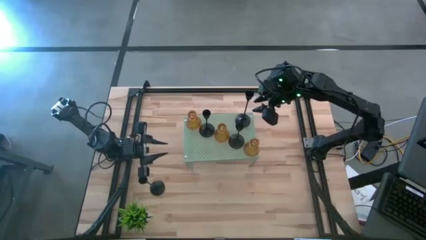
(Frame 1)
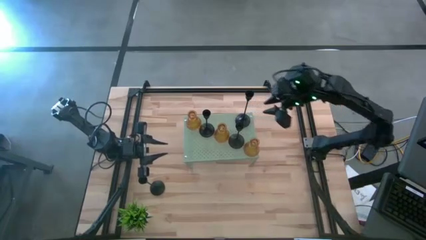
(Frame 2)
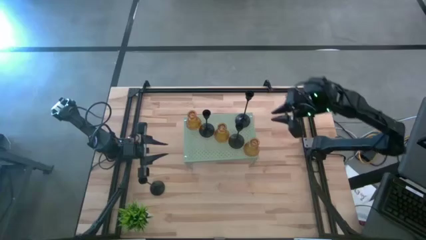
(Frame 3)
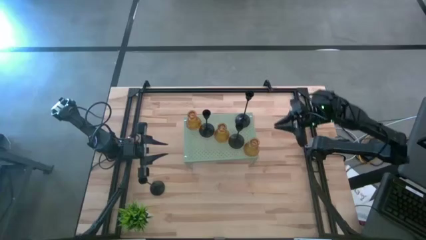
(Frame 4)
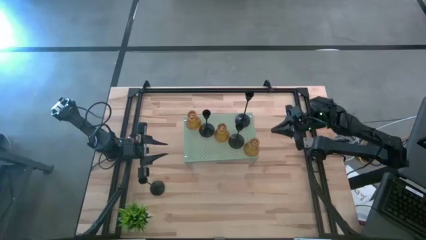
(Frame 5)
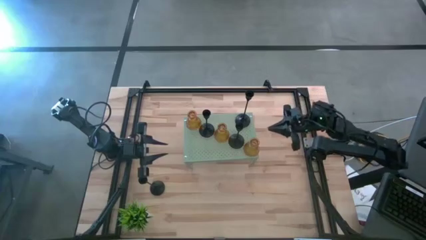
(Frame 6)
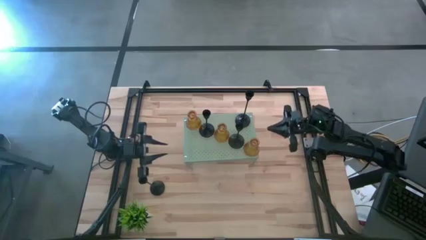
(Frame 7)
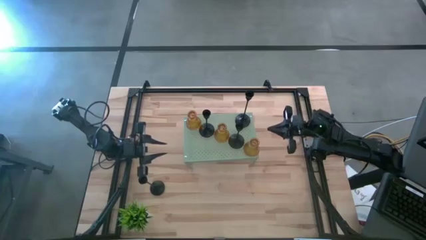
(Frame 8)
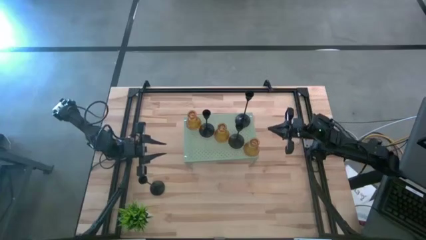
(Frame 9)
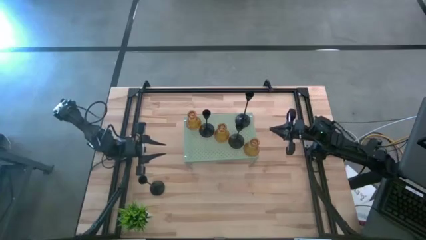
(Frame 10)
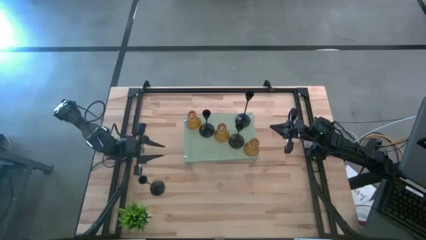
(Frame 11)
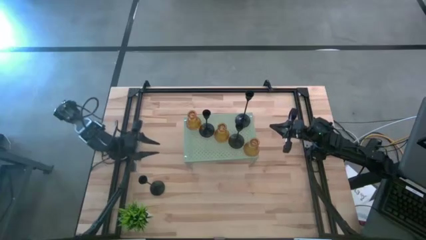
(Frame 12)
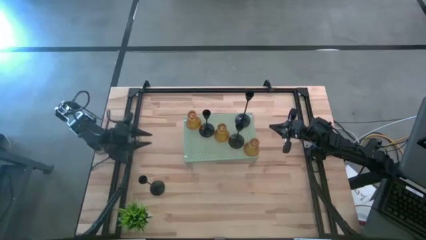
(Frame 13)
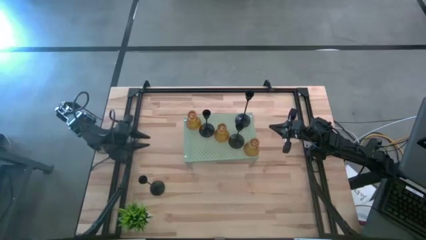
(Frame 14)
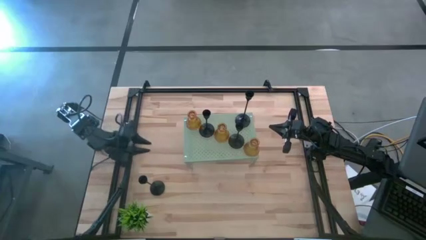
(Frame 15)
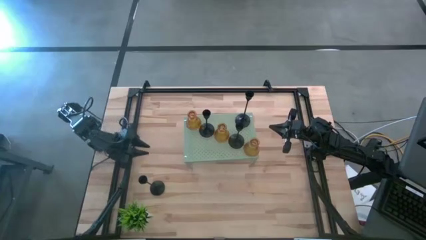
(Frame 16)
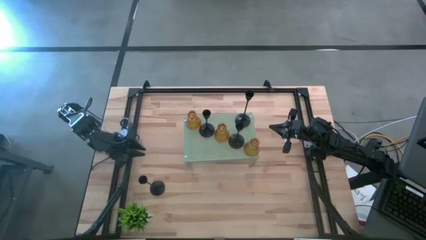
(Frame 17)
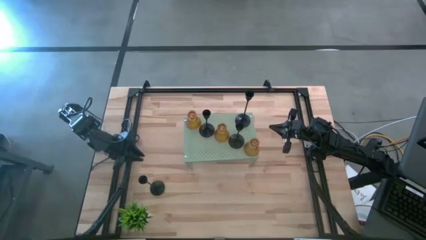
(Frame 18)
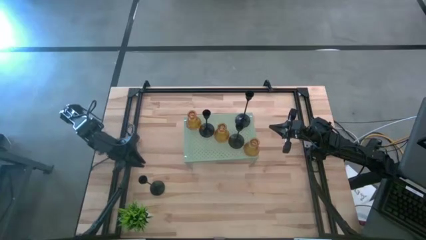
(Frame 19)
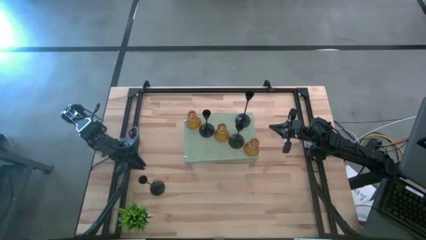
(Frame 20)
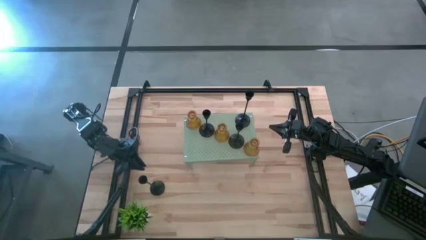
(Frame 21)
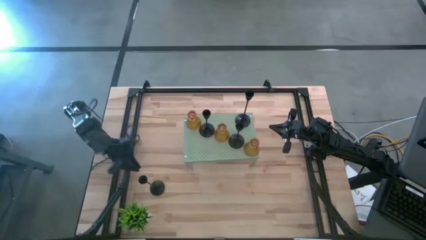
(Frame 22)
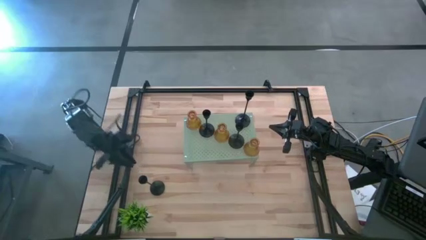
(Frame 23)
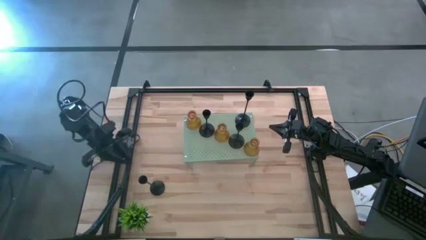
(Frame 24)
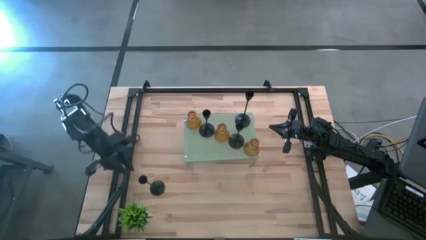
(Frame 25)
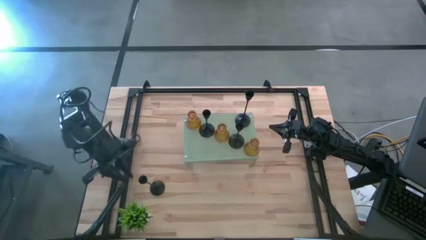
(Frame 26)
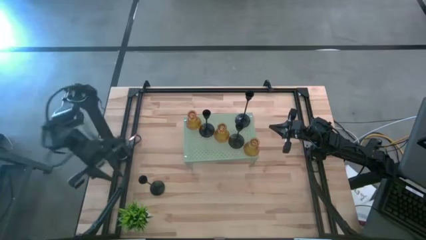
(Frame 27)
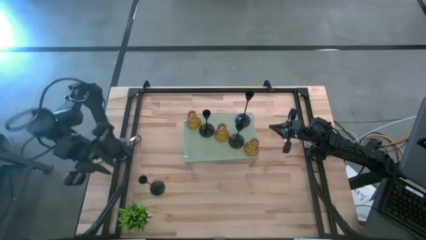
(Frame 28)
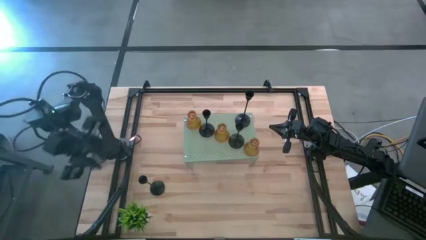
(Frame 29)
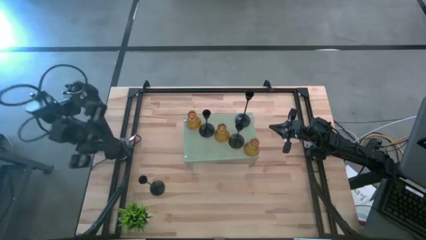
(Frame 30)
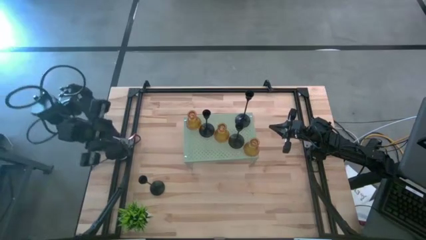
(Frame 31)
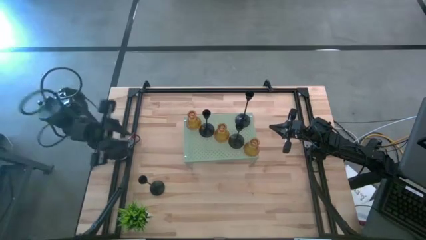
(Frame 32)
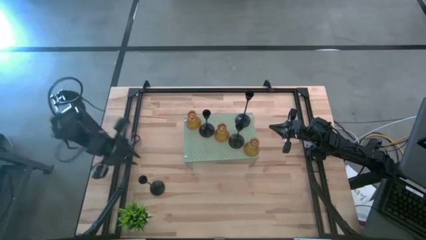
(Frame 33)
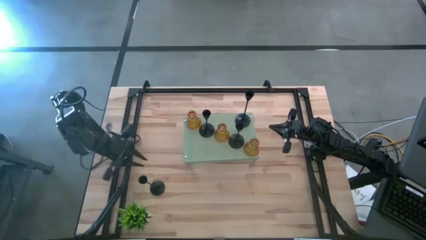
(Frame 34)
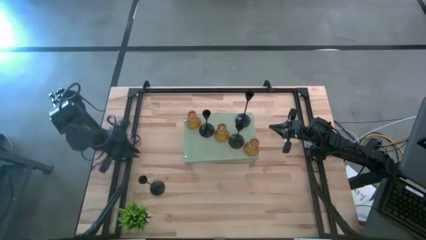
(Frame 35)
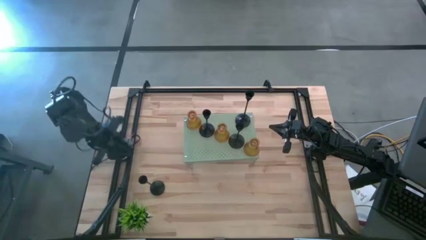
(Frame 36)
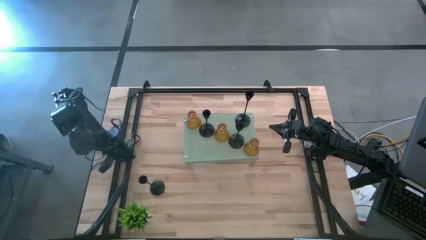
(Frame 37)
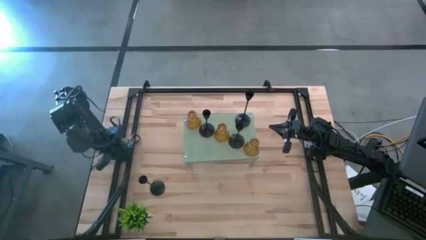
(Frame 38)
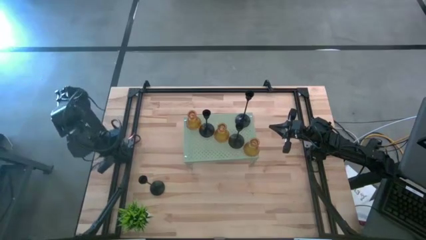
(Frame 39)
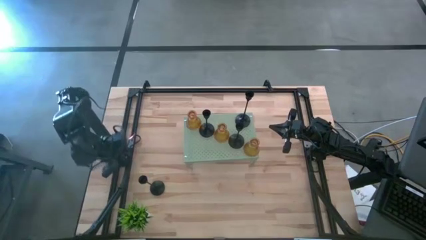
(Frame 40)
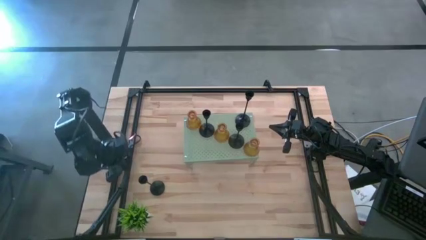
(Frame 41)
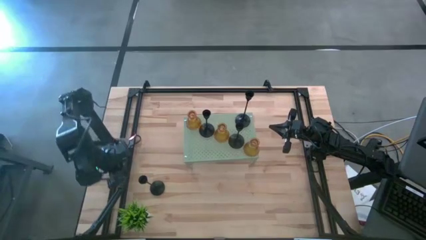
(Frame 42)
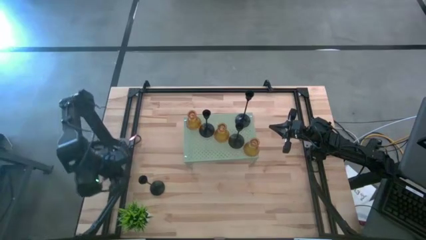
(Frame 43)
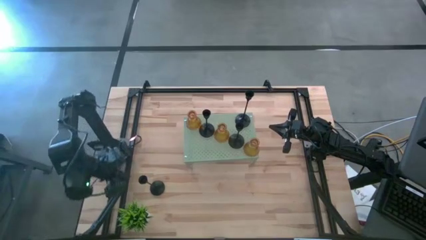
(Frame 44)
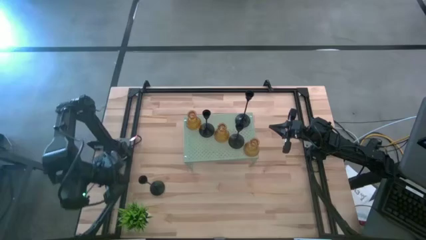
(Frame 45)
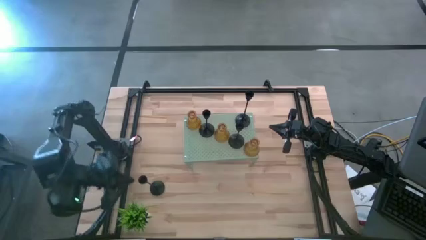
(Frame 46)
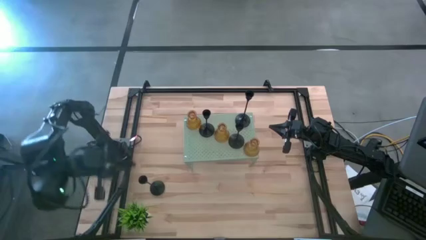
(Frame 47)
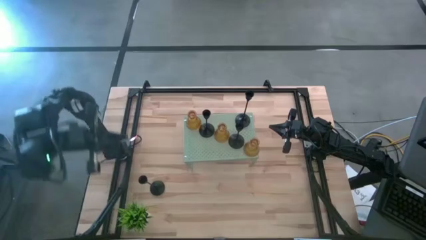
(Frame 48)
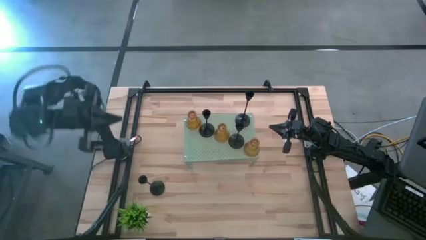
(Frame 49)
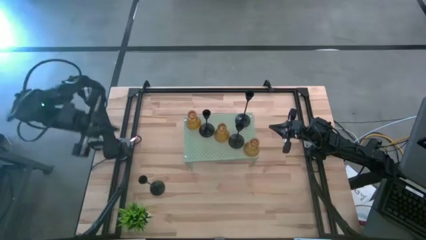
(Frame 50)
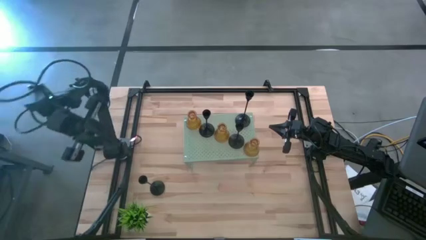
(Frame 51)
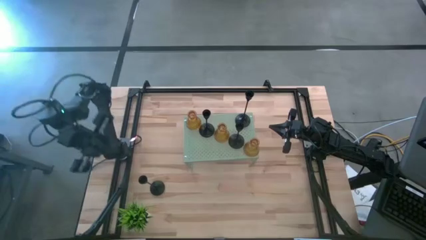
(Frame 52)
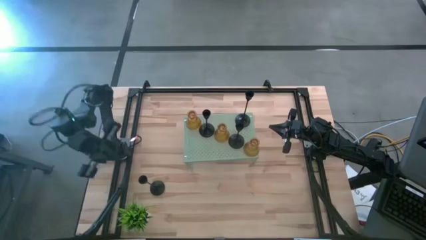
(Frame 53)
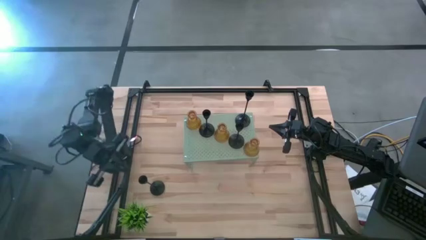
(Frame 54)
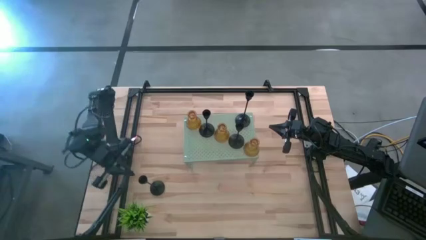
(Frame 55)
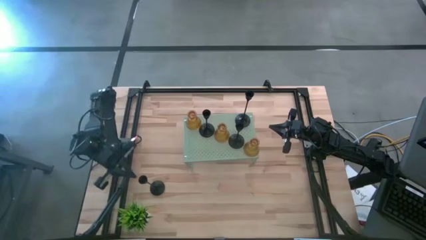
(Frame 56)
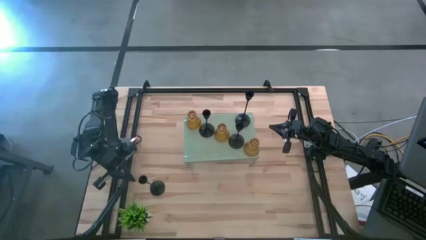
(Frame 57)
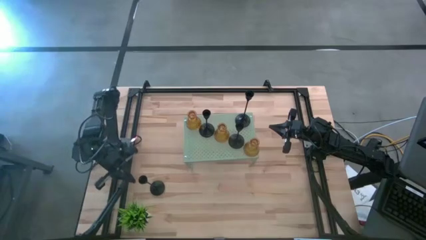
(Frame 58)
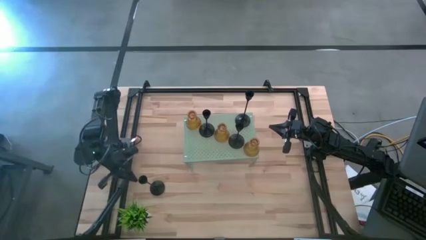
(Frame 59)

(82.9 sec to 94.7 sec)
Task: Pick & Place candle stick holders
Put the black candle holder on the shelf
